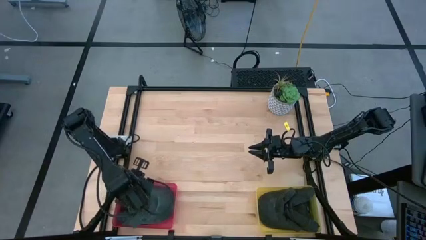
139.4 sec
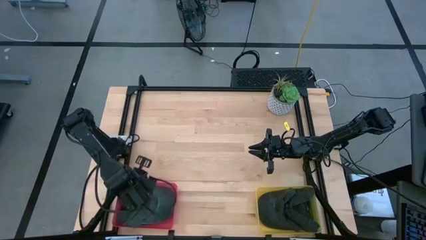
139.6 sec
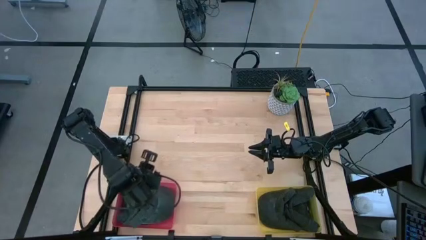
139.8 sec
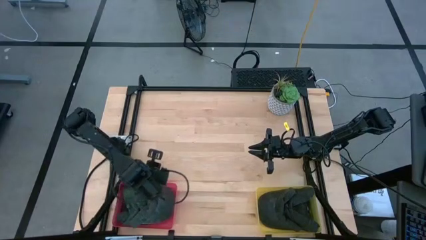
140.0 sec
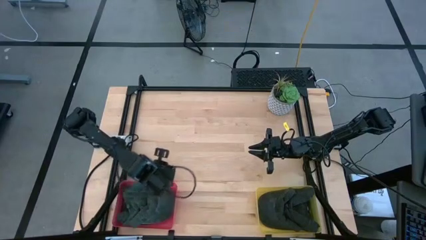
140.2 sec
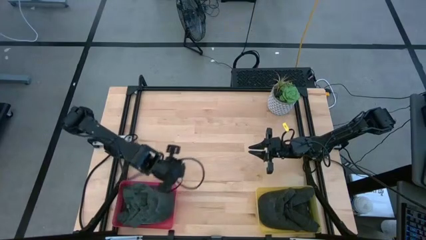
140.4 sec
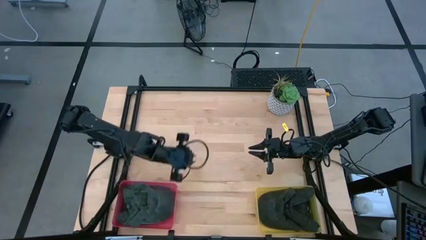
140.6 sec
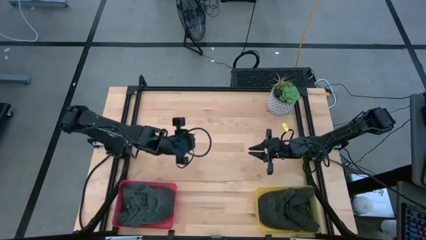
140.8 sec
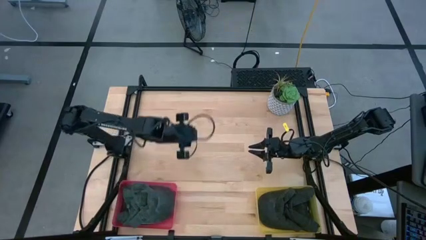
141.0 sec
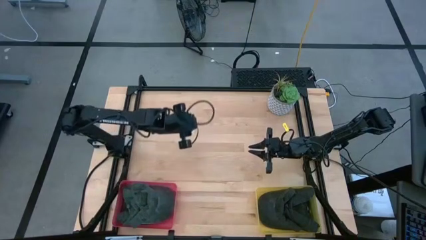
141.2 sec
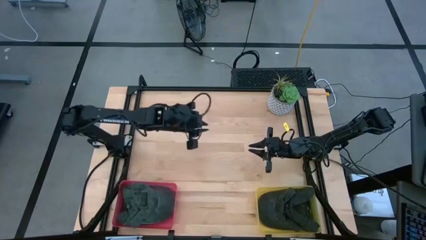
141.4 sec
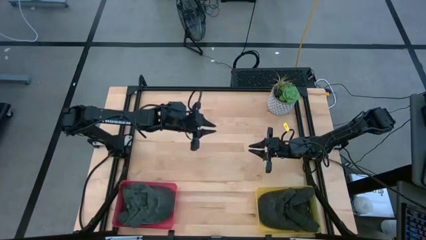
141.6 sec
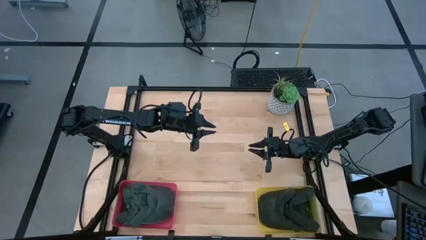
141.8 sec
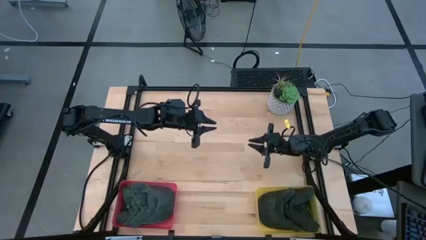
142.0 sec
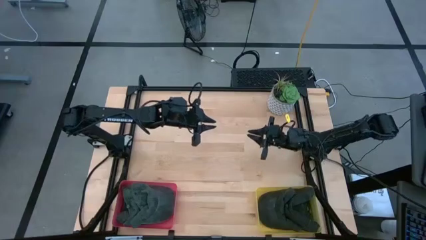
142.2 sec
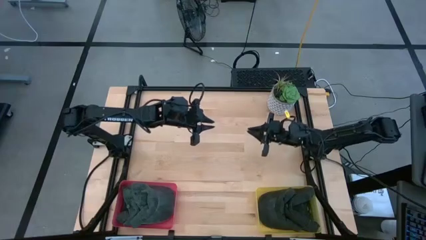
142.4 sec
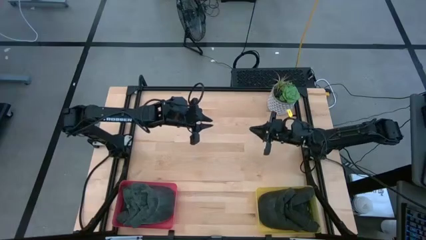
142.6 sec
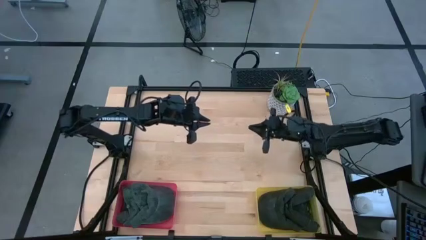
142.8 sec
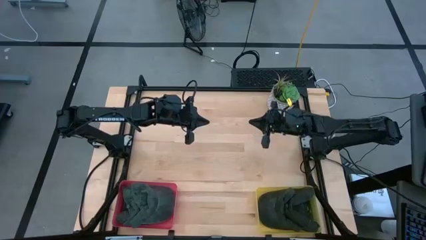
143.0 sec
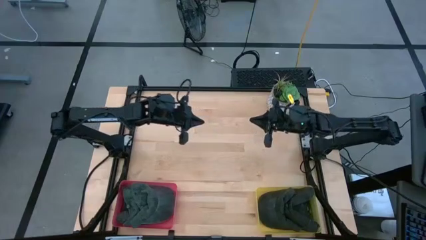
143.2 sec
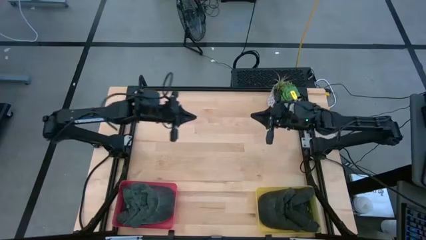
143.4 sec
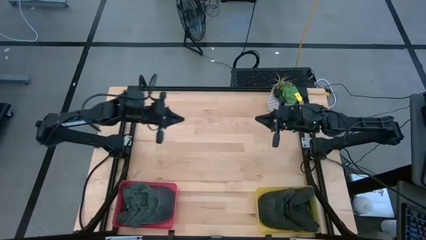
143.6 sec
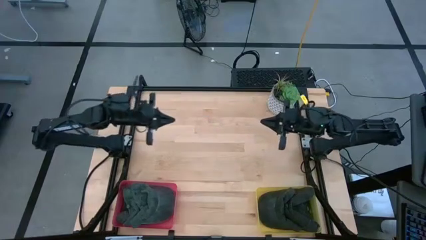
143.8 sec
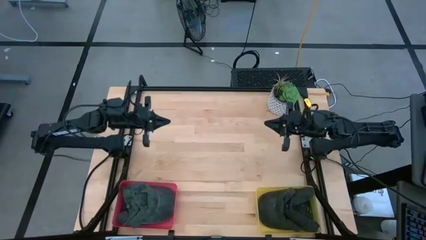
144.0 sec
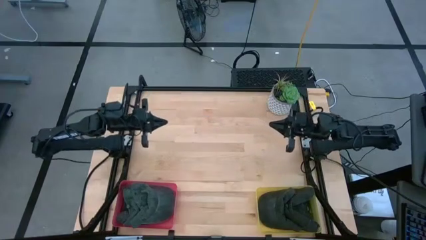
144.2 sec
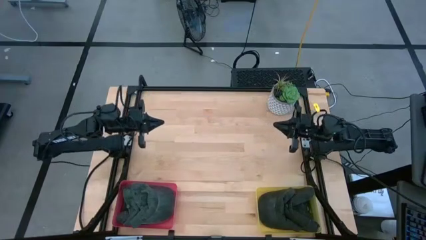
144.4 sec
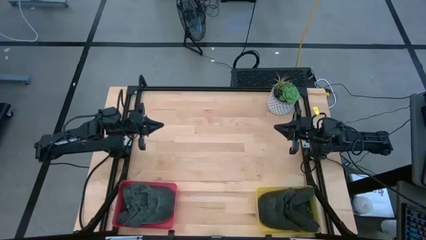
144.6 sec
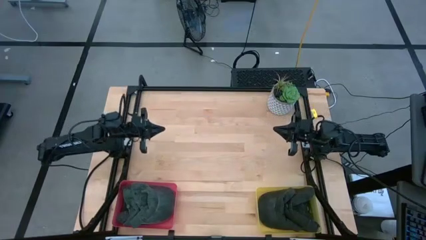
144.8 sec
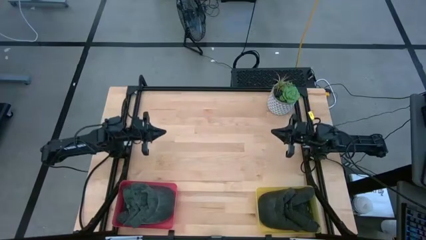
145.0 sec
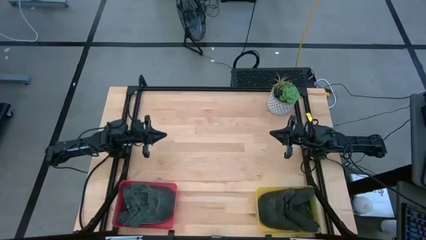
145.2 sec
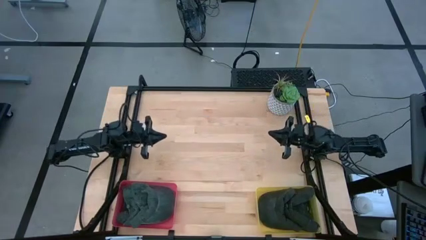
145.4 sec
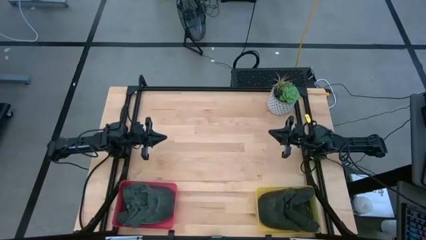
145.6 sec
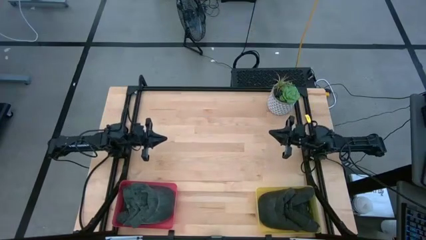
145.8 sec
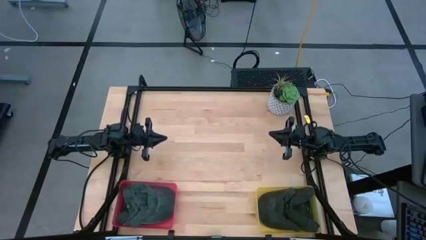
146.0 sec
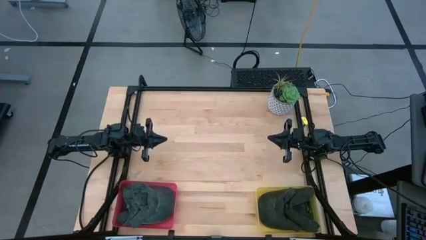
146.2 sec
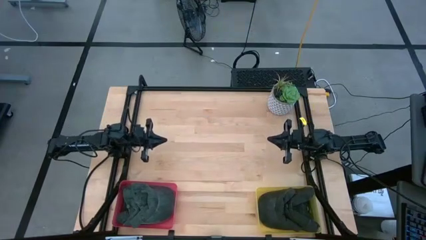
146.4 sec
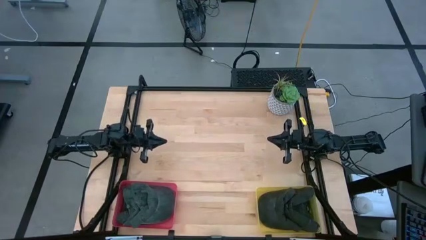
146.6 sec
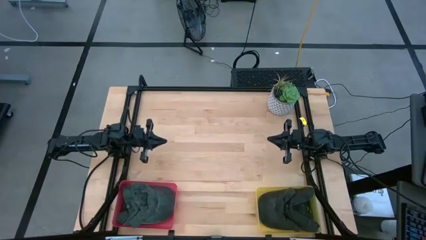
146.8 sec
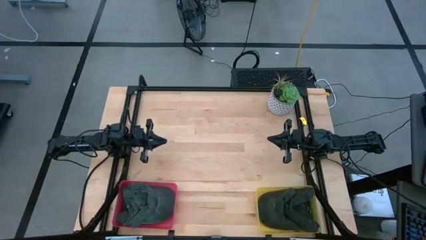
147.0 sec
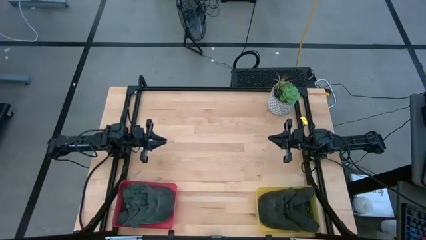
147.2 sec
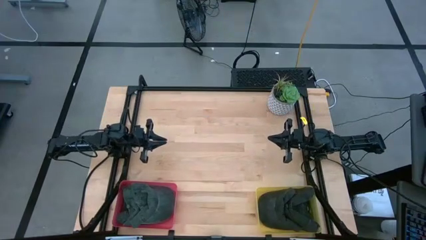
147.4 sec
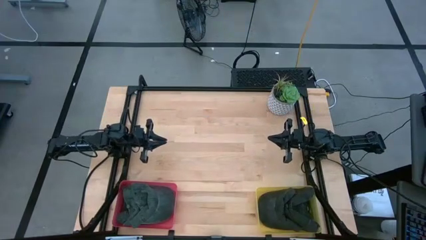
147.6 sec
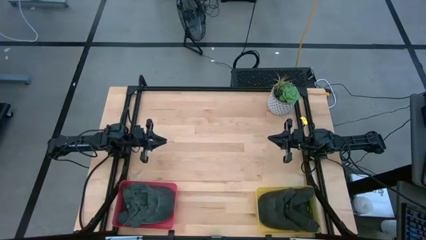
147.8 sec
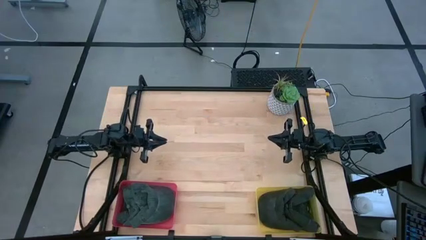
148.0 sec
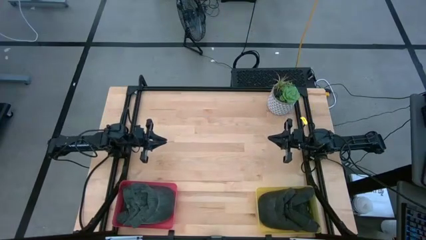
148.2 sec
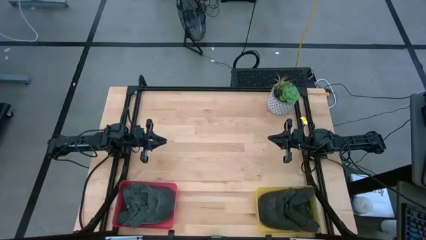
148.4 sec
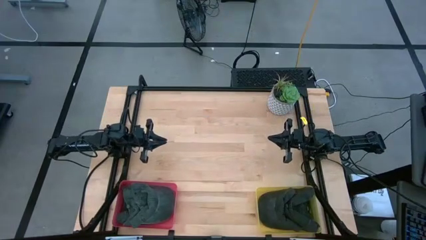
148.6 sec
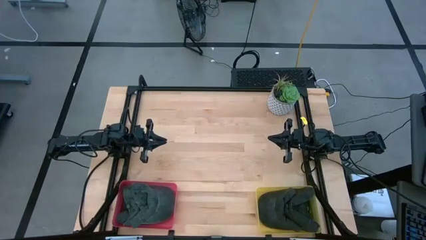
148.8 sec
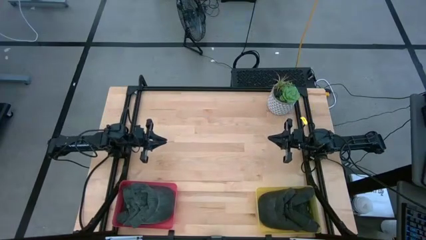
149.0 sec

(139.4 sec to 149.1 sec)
Task: Pick & Place hat
Return to Home Position

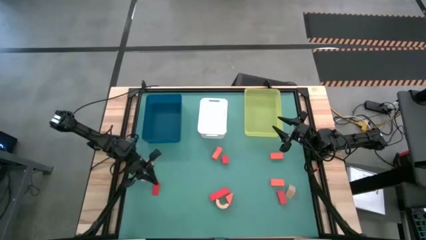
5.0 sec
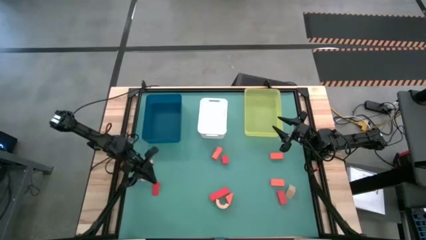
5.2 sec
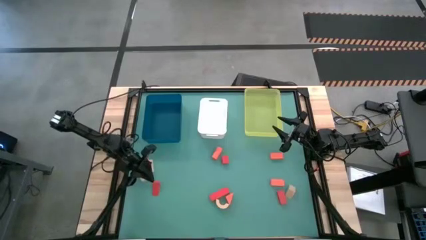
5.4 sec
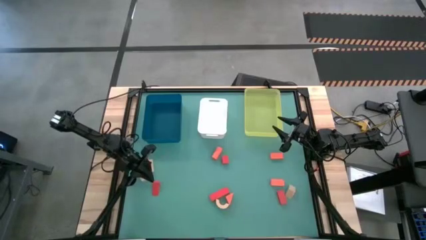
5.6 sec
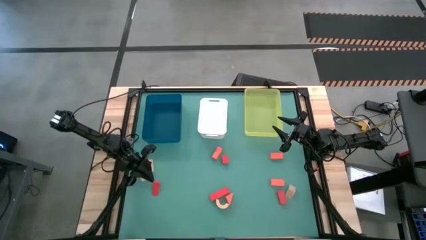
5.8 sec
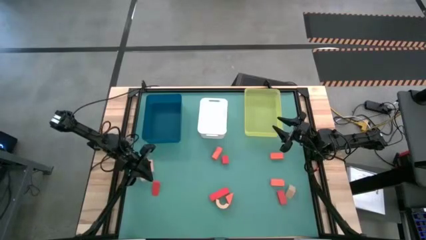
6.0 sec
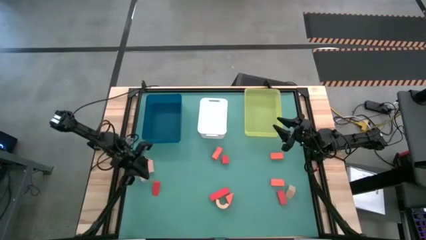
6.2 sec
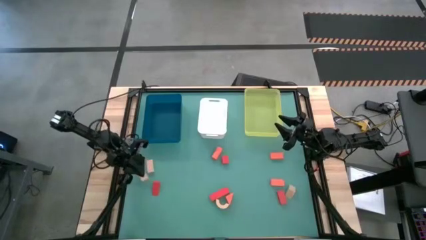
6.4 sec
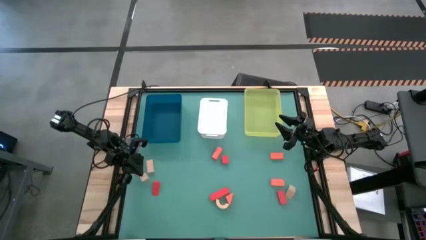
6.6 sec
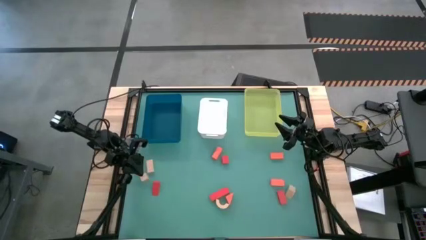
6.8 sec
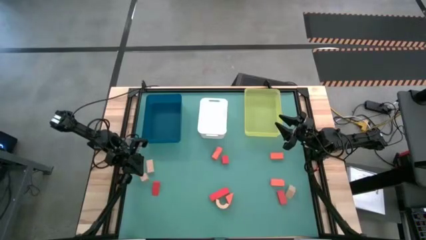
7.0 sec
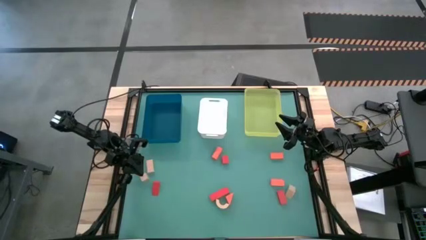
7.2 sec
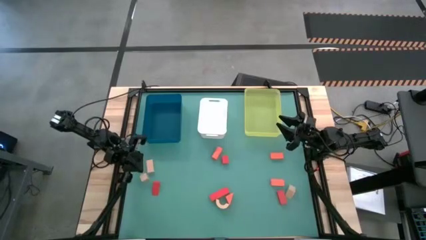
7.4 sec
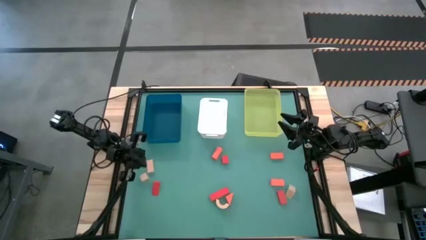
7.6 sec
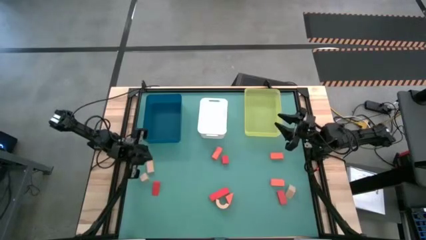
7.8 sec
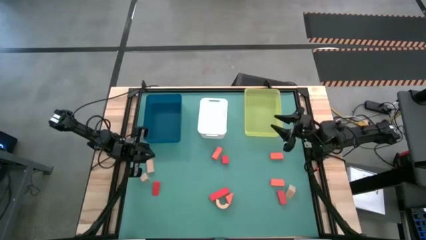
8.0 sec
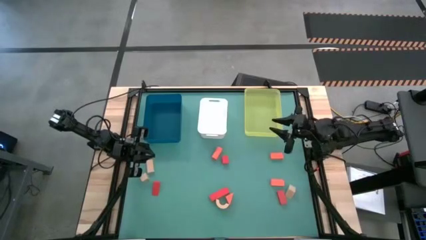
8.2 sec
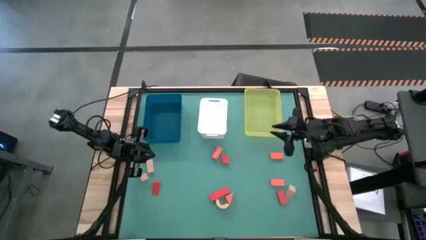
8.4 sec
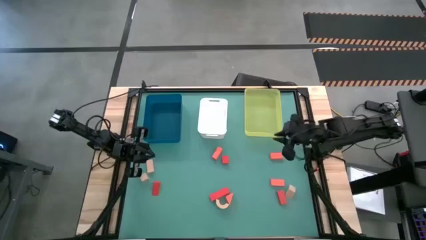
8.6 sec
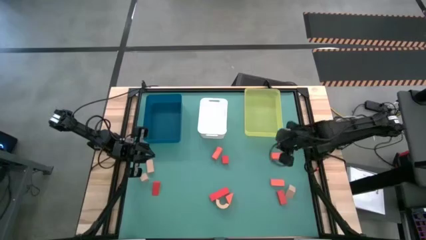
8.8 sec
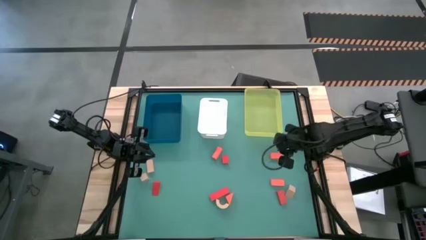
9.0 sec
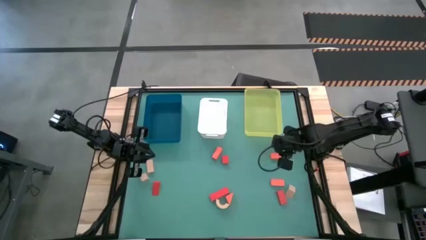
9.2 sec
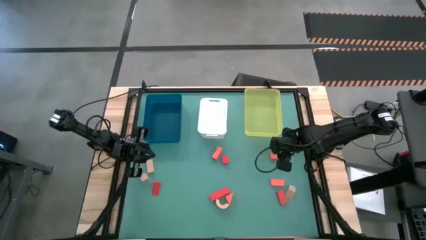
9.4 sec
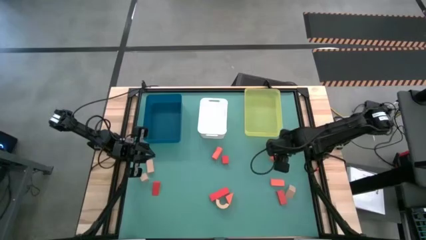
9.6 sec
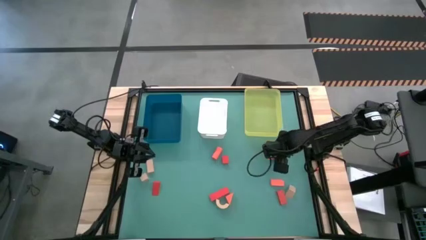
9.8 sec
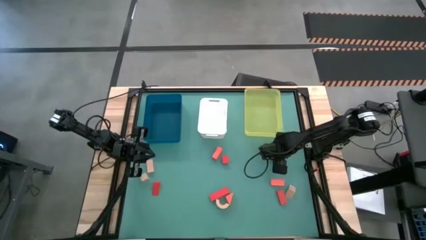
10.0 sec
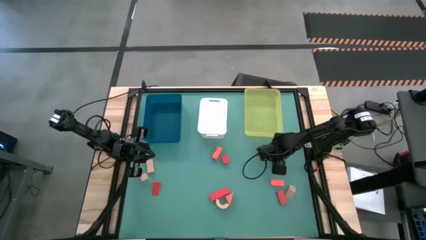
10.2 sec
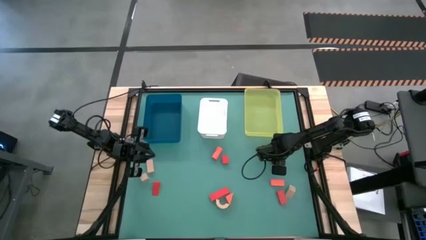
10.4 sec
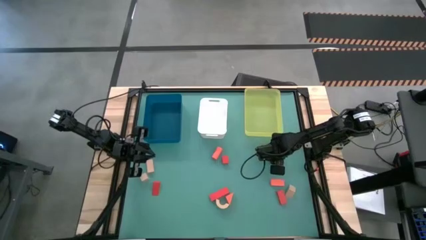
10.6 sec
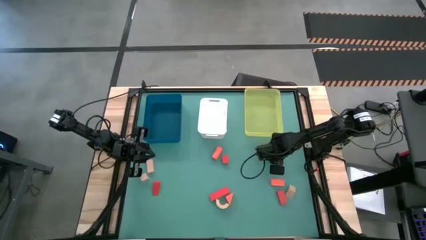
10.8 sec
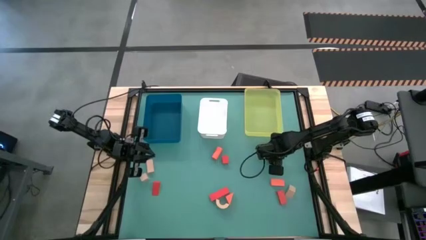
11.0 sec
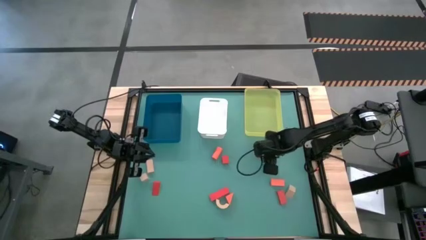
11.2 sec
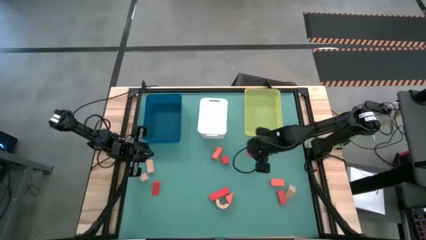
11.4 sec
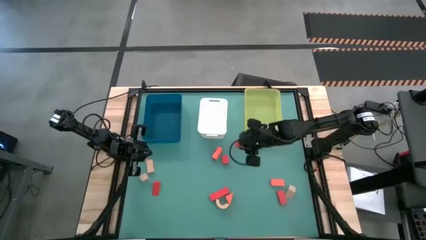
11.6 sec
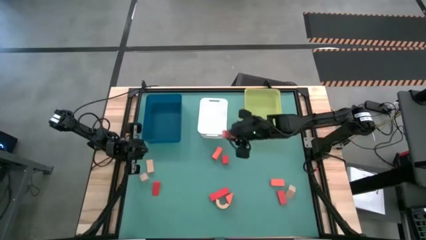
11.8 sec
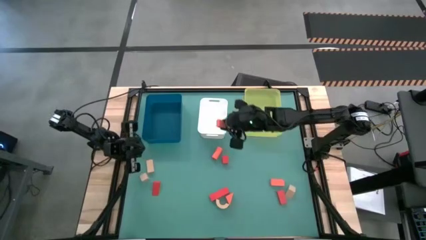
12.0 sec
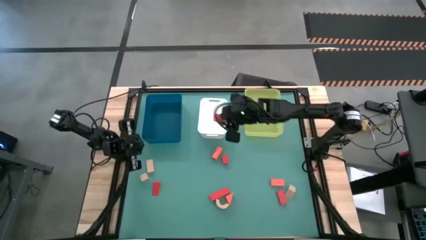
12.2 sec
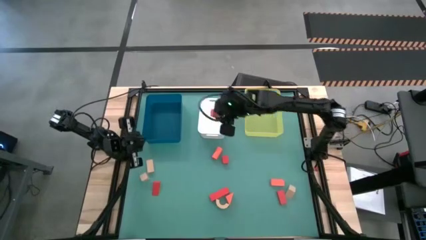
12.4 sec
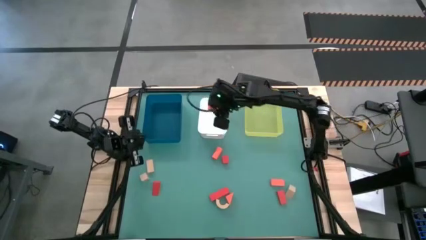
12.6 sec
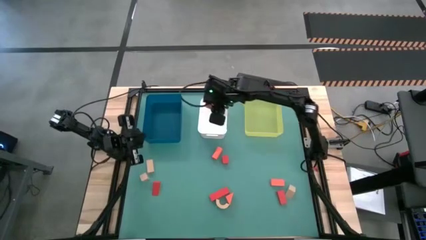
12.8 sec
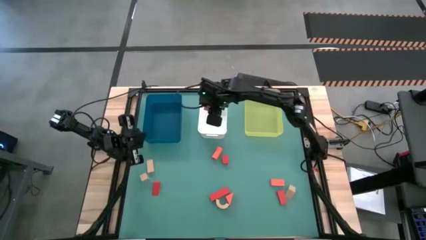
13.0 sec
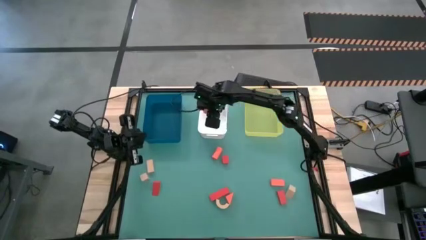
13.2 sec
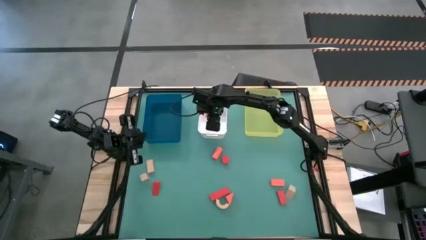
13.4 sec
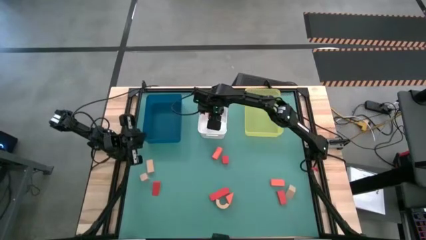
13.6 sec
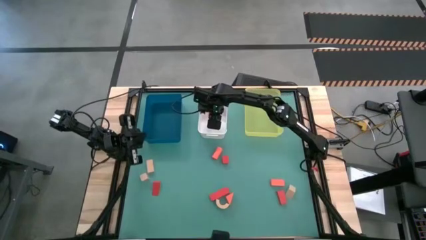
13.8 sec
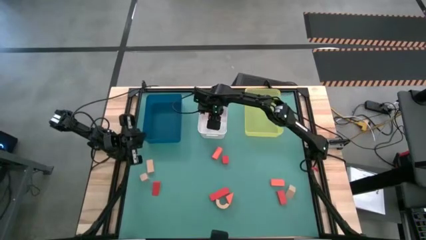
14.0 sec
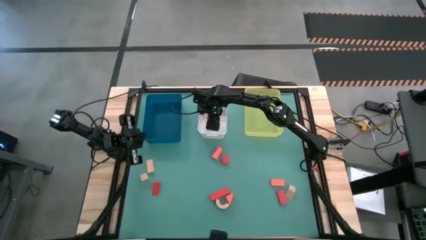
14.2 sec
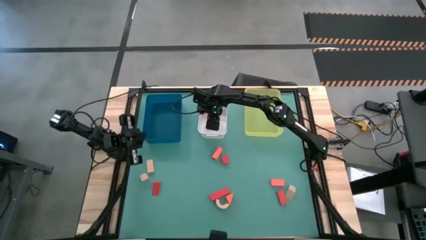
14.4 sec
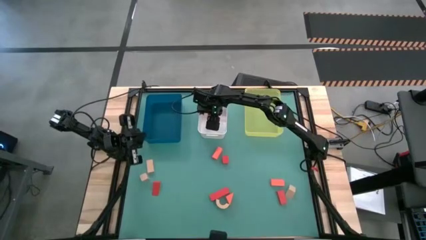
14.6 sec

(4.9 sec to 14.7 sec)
Task: Sort & place blocks by color
Put the top right orange block into the white bin
